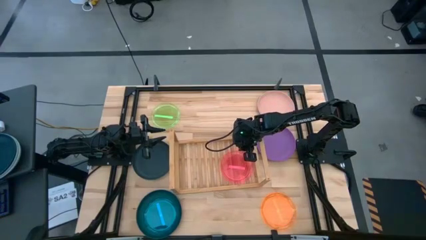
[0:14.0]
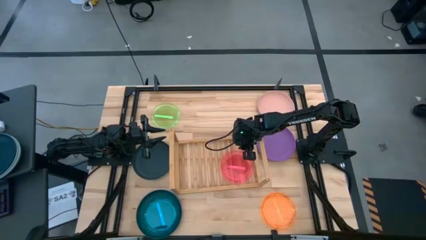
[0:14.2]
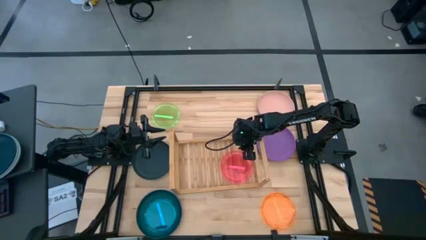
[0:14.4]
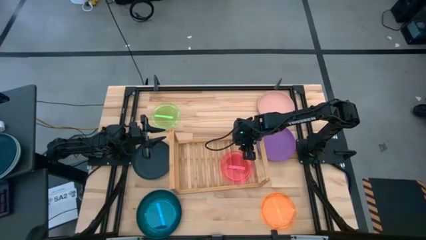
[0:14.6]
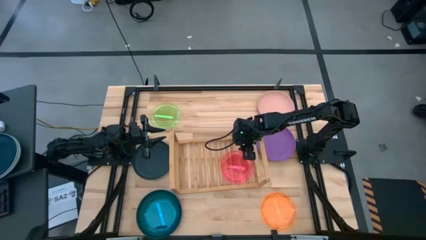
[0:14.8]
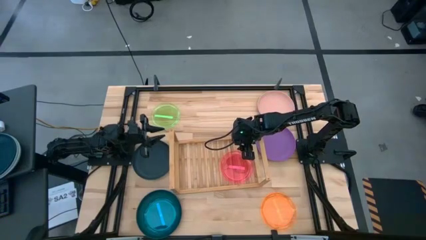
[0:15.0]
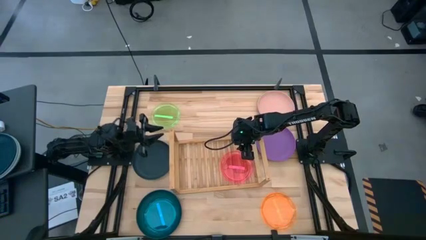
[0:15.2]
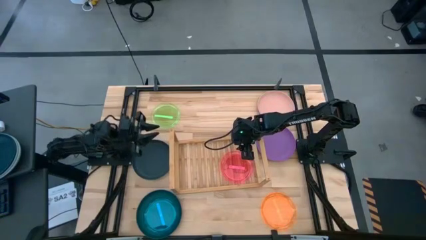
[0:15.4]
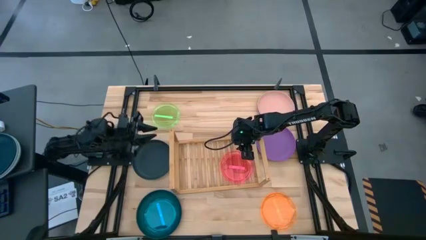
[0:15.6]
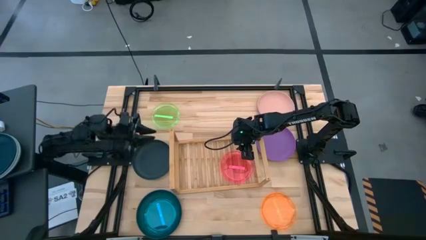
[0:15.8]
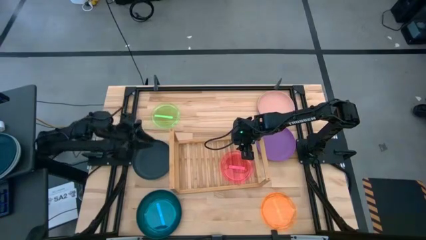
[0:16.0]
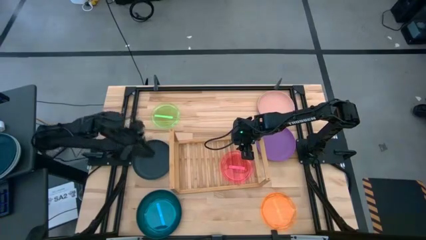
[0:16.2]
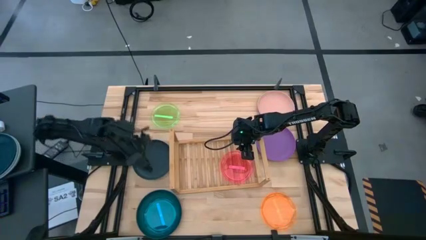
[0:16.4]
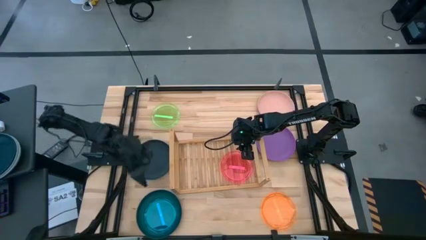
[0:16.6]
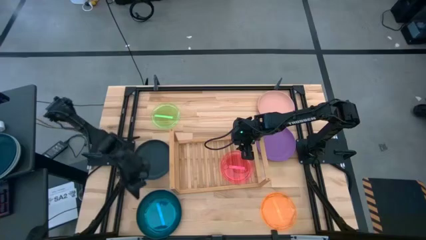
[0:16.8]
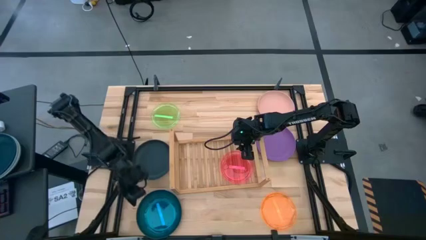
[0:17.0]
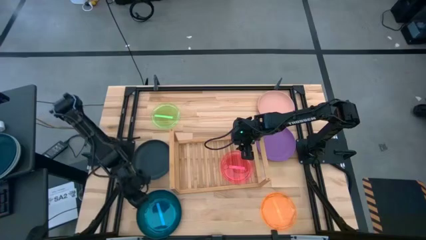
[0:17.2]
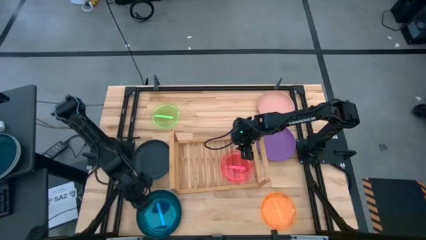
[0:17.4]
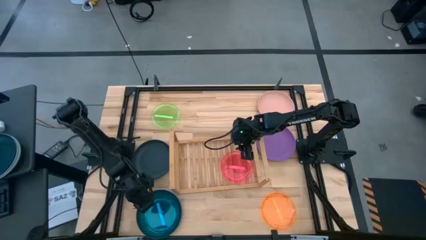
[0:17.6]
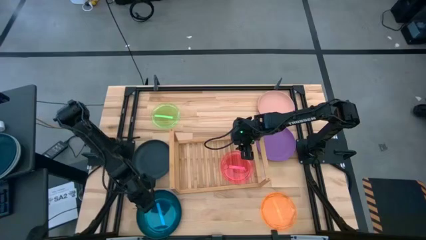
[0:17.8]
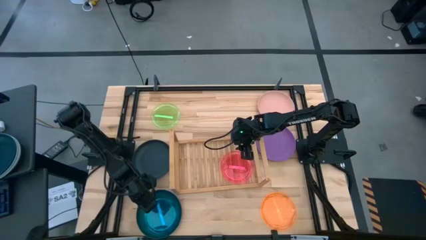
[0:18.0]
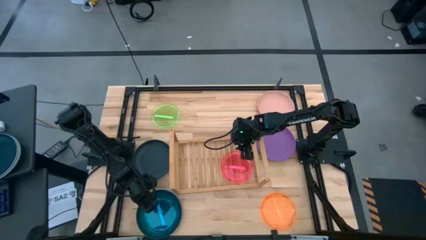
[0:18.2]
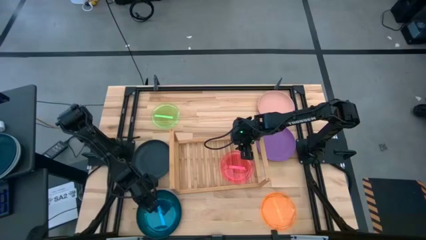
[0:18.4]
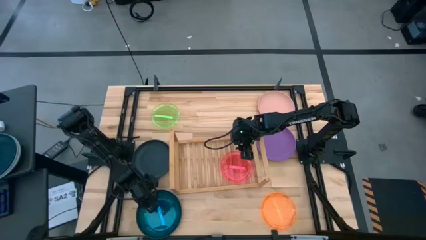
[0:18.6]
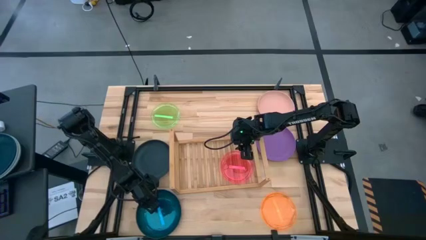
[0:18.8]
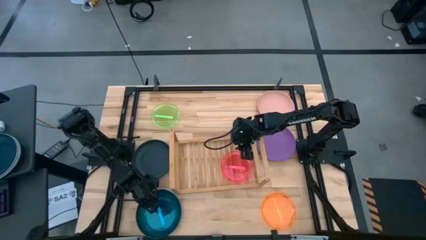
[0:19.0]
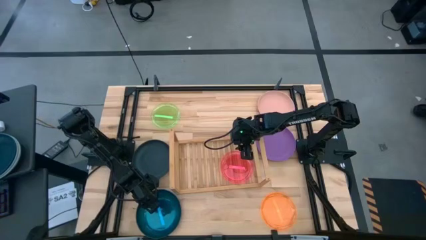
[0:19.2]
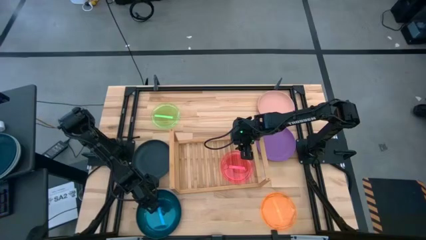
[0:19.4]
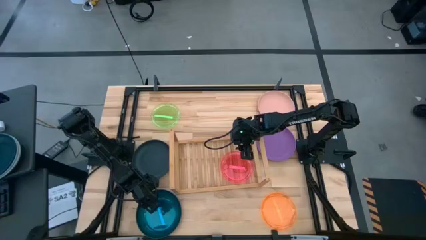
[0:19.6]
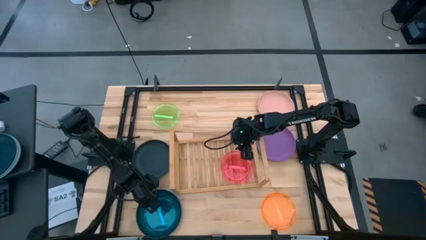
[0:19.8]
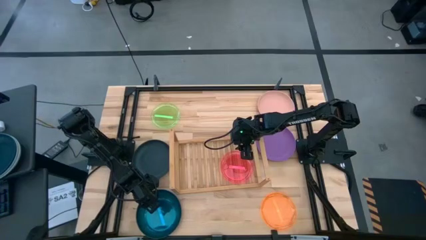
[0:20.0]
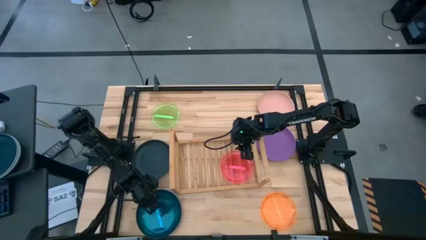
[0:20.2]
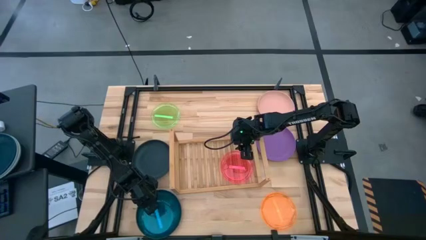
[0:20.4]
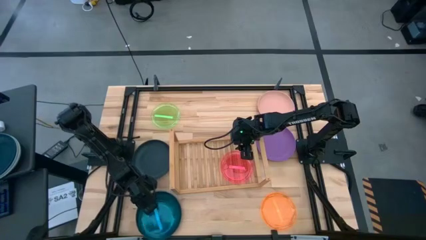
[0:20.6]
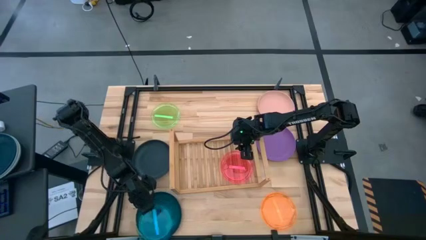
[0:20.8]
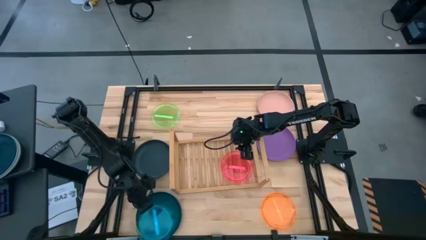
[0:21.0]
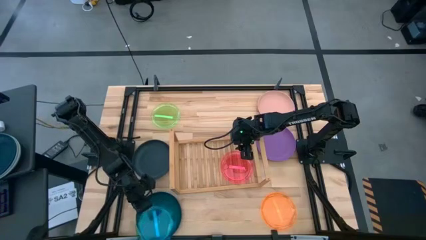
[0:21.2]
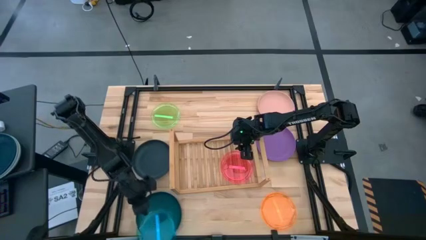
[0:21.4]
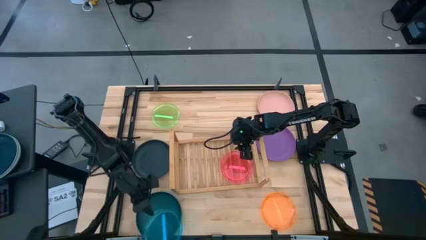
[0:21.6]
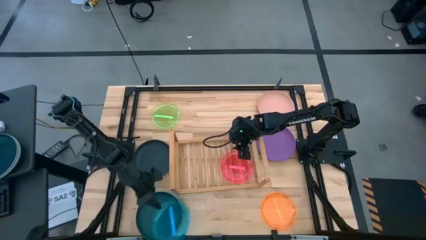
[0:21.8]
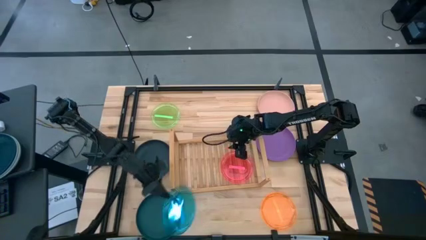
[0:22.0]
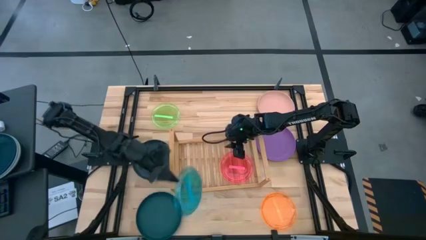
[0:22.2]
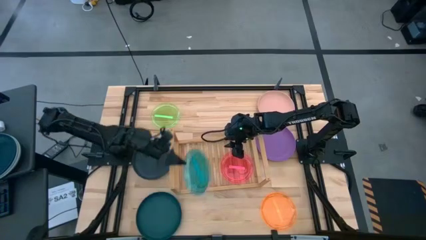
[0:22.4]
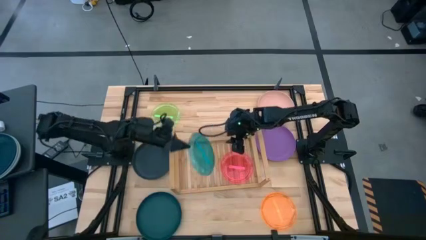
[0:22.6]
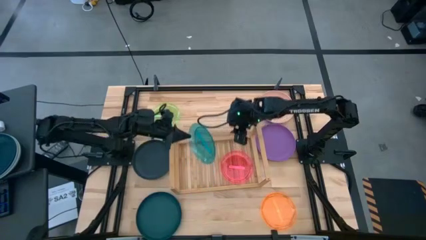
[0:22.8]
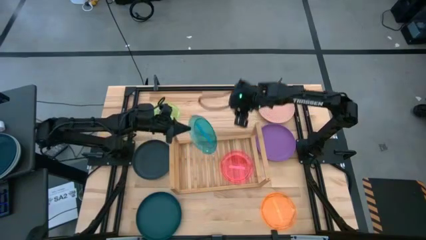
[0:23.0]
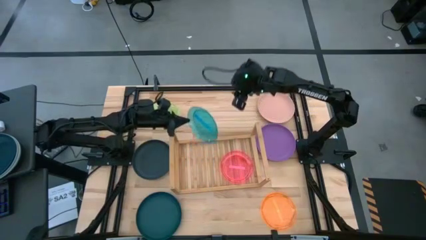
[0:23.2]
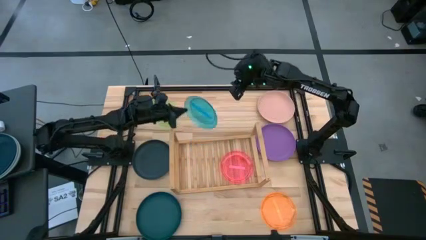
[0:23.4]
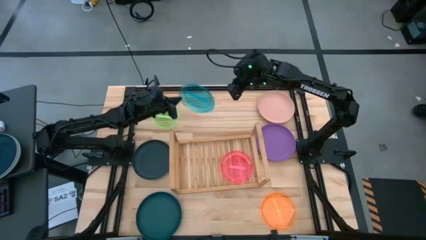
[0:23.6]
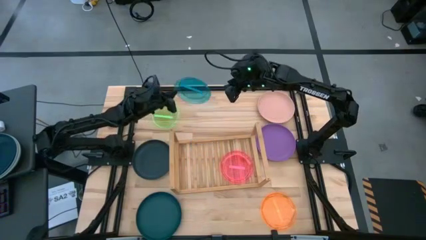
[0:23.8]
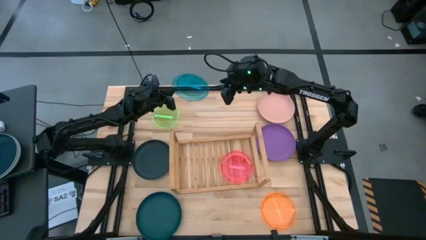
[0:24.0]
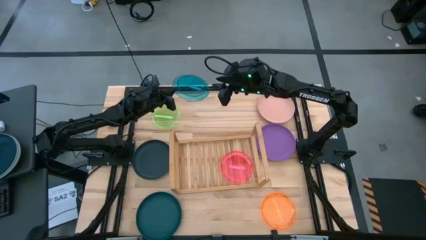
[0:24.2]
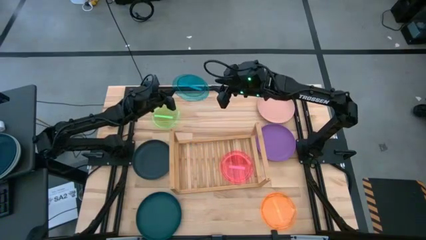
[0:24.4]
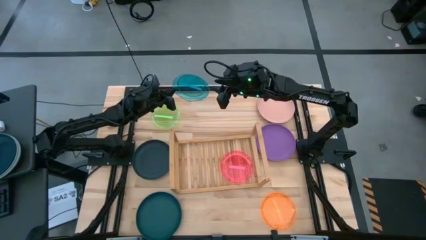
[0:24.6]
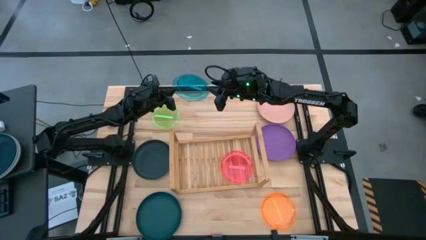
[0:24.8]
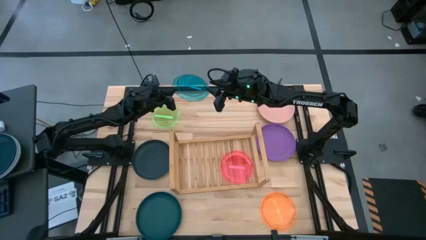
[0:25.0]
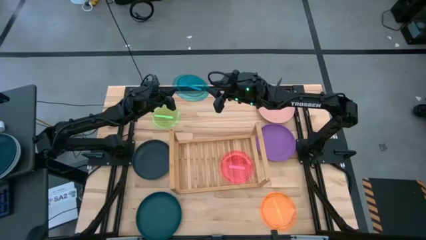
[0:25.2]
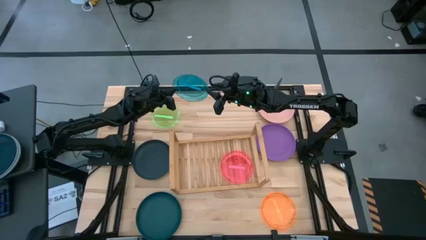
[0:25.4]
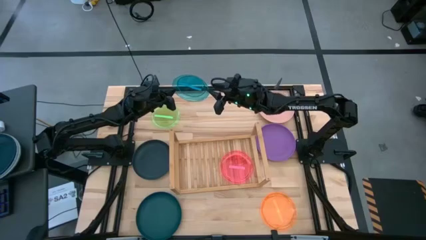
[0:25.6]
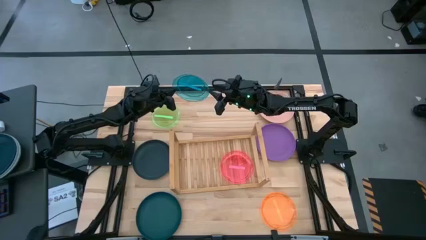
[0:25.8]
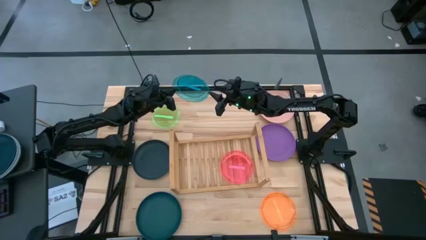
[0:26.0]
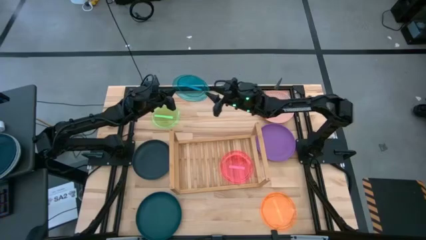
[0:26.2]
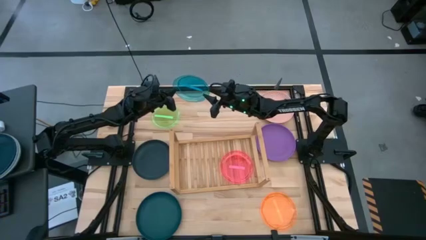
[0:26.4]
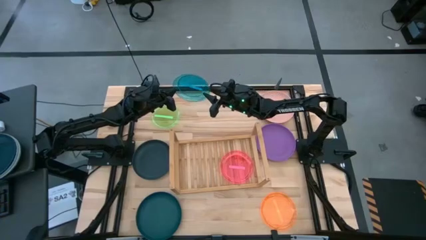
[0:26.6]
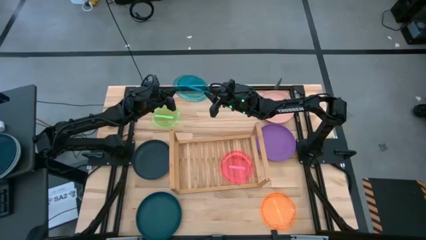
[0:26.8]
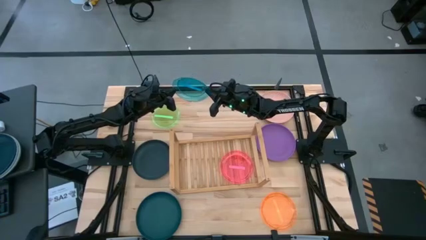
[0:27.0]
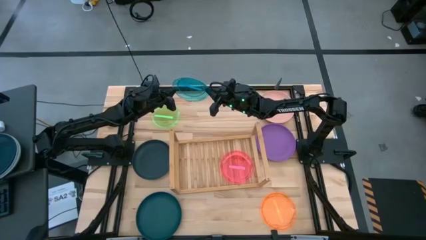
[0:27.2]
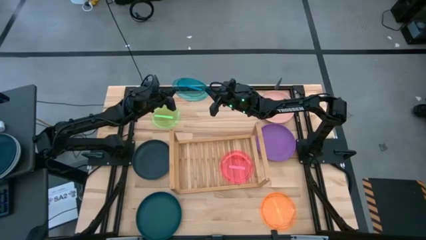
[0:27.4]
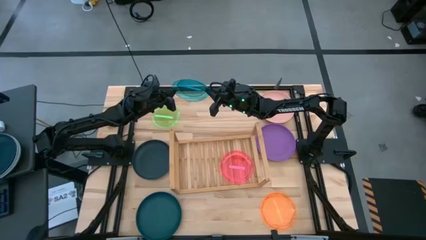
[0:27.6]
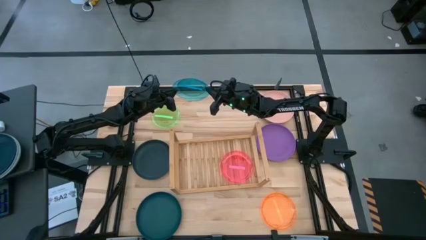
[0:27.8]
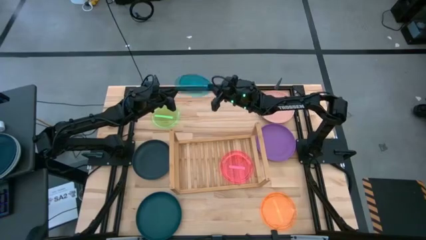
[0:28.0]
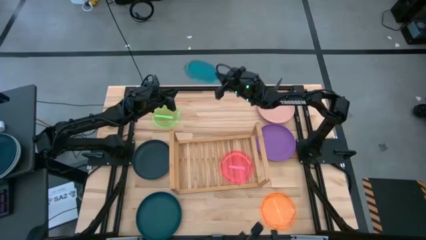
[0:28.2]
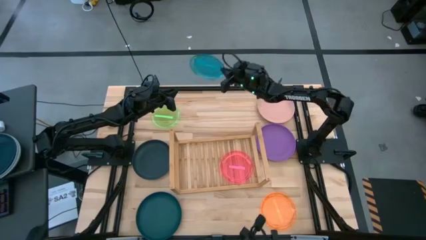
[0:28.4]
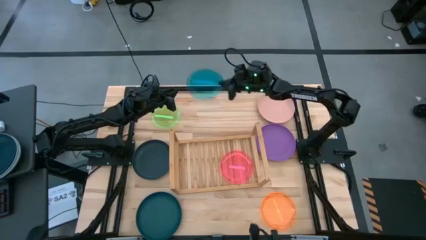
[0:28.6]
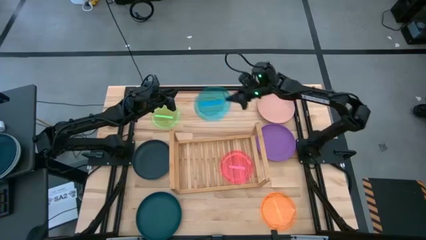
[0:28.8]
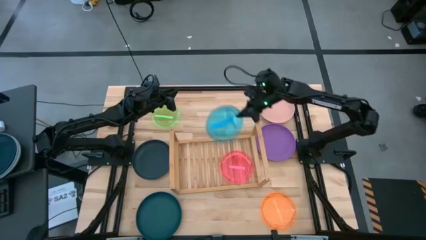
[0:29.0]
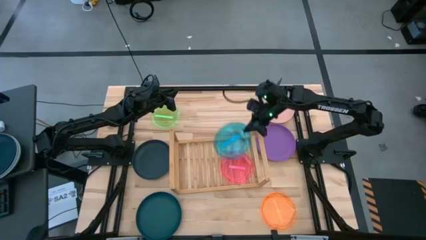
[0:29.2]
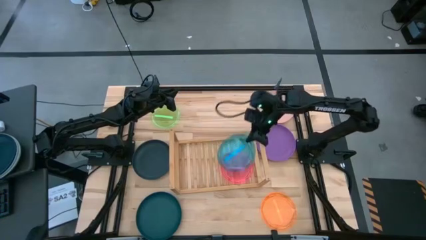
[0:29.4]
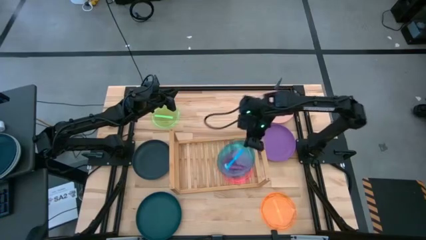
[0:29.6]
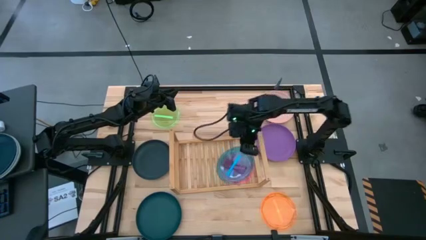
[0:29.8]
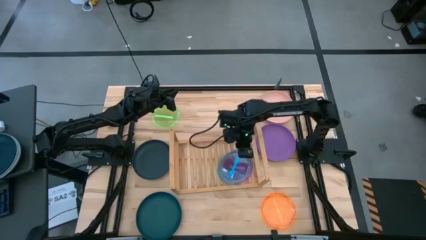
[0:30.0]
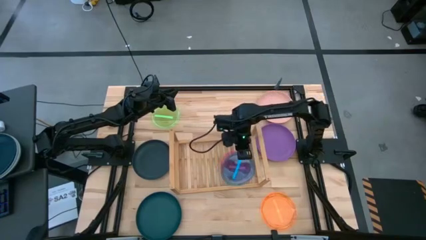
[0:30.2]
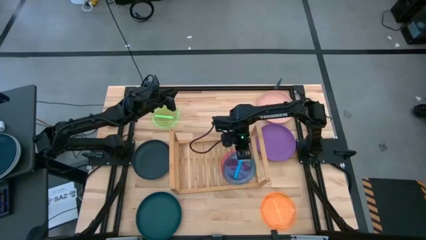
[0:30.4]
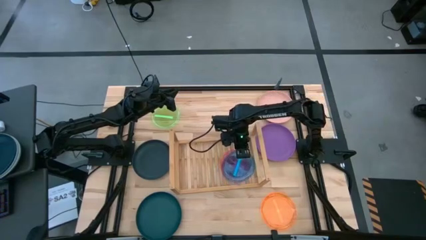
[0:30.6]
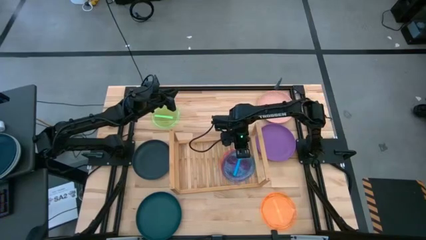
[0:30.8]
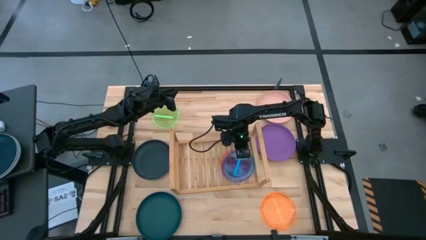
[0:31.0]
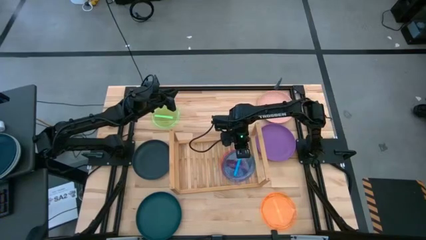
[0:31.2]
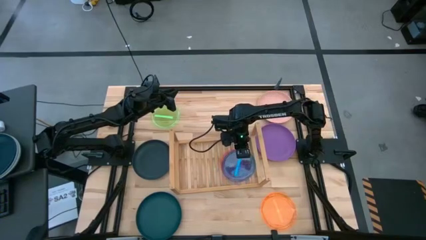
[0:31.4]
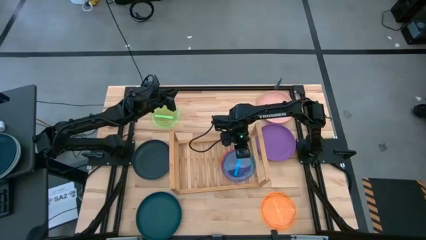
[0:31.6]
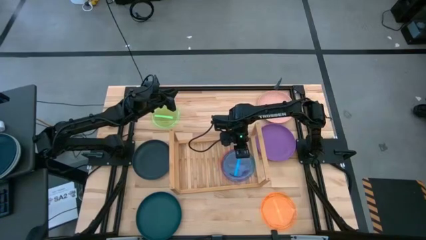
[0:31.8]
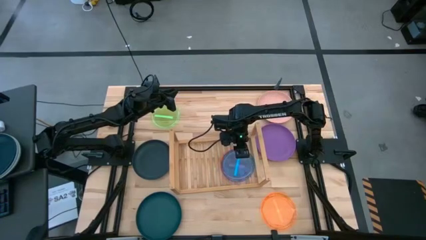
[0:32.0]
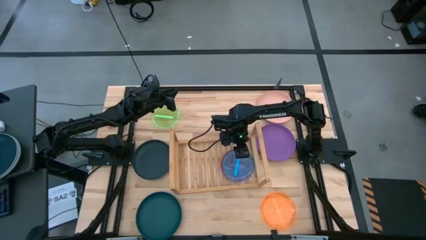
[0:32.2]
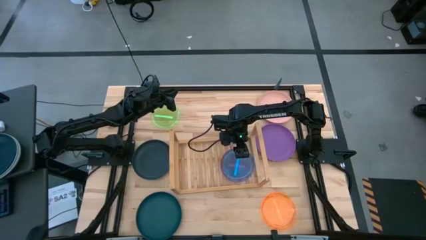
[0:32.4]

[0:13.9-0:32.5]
Task: Place and stack plates onto a shelf
Stack the blue plate on top of the red plate on the shelf
